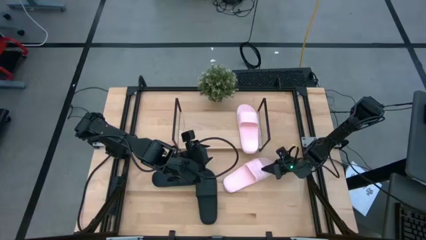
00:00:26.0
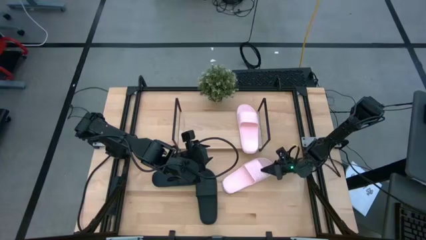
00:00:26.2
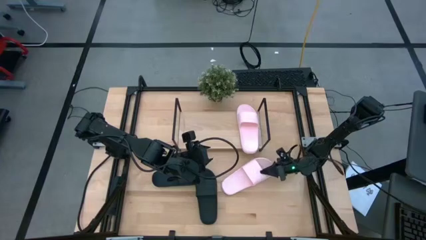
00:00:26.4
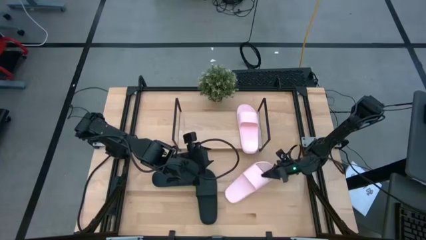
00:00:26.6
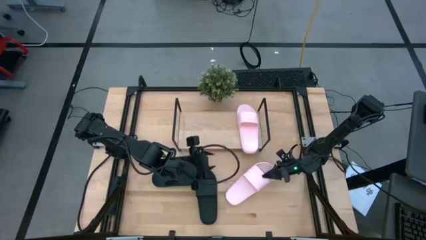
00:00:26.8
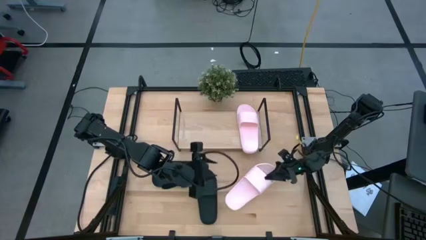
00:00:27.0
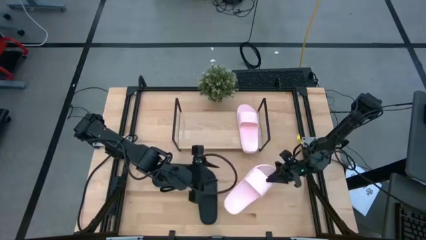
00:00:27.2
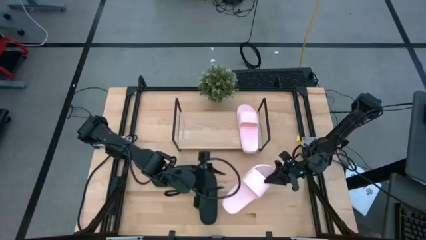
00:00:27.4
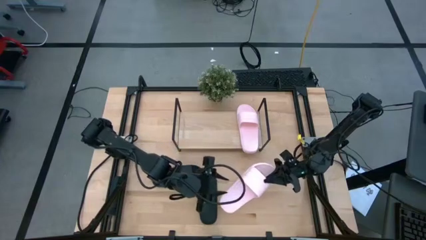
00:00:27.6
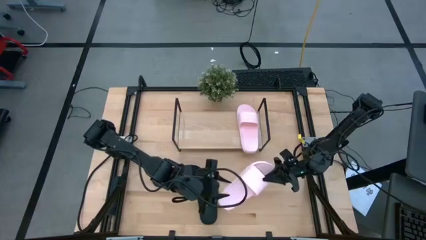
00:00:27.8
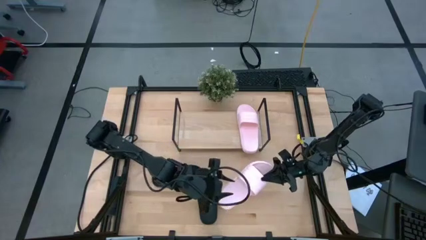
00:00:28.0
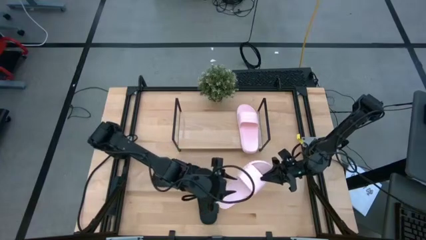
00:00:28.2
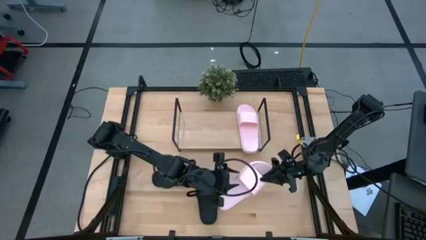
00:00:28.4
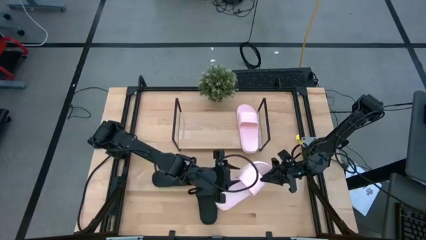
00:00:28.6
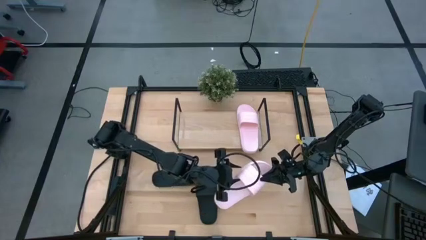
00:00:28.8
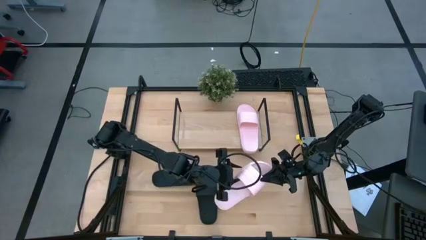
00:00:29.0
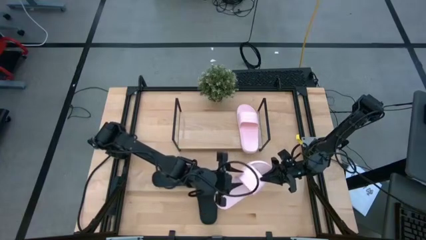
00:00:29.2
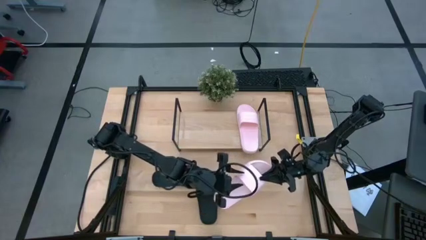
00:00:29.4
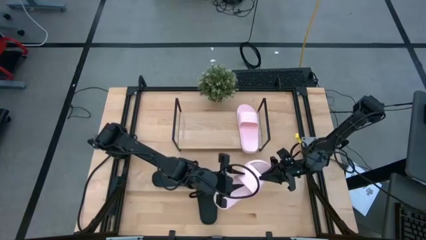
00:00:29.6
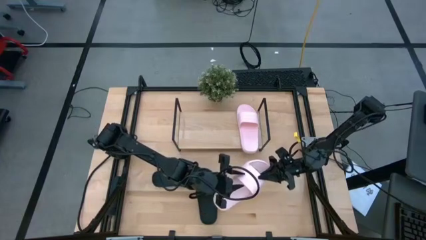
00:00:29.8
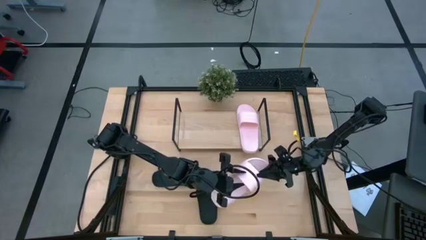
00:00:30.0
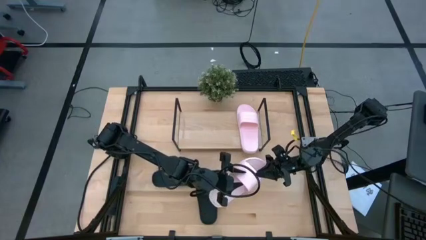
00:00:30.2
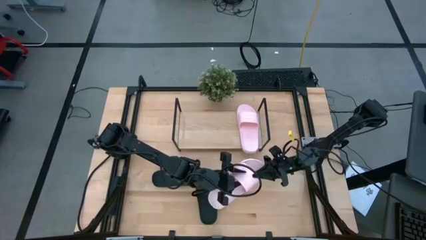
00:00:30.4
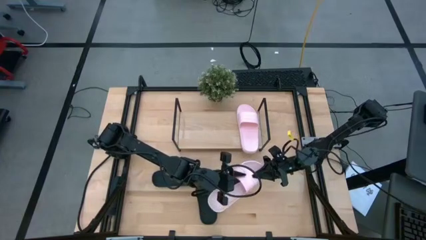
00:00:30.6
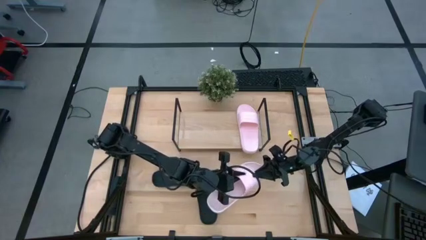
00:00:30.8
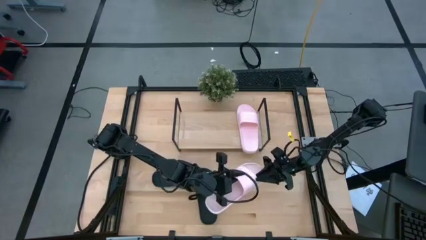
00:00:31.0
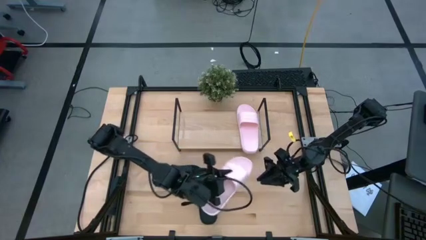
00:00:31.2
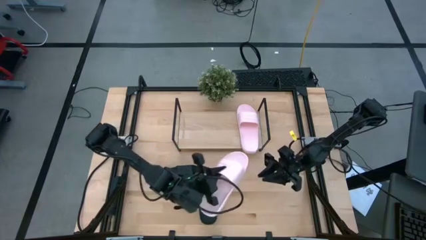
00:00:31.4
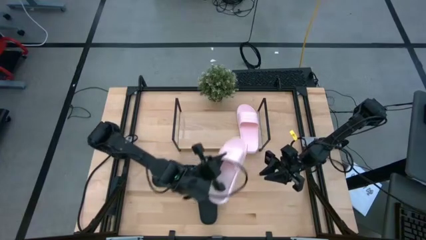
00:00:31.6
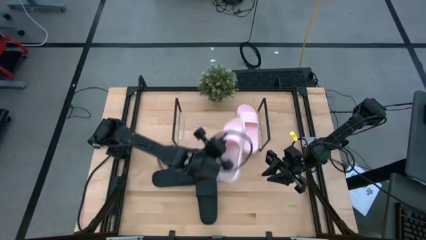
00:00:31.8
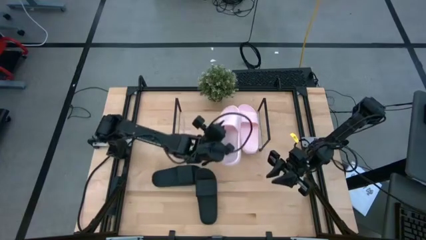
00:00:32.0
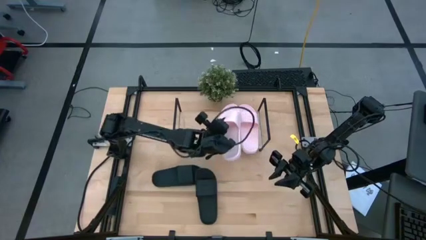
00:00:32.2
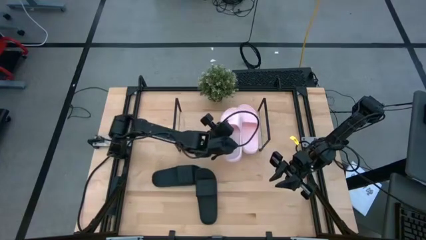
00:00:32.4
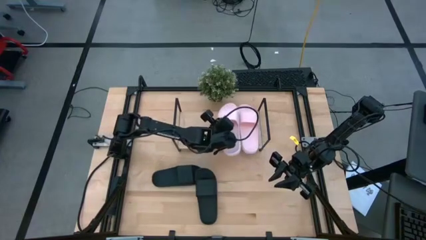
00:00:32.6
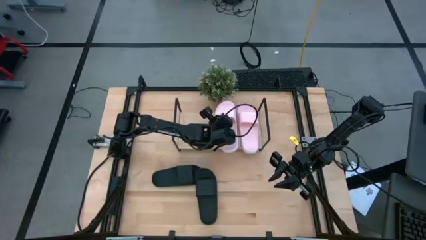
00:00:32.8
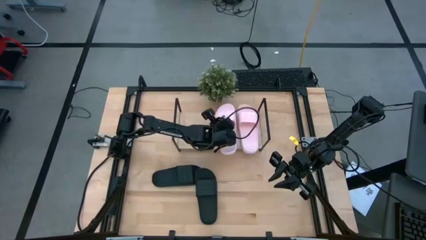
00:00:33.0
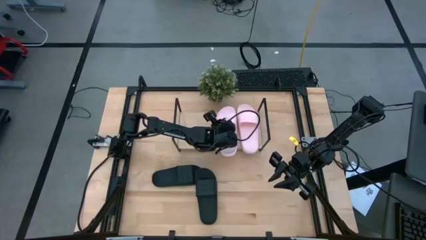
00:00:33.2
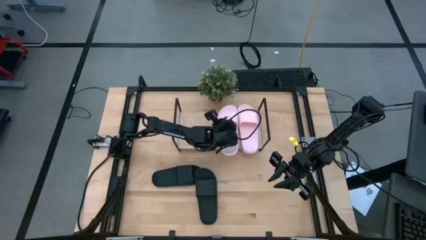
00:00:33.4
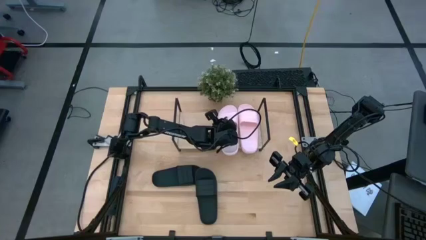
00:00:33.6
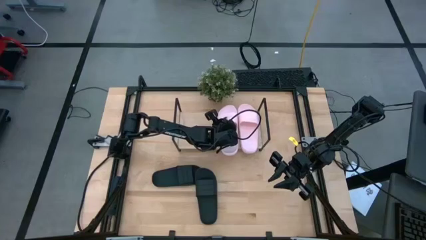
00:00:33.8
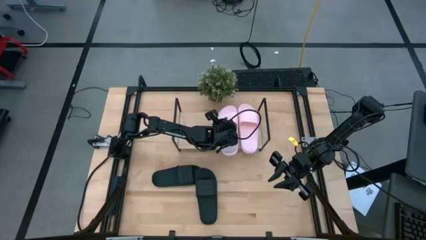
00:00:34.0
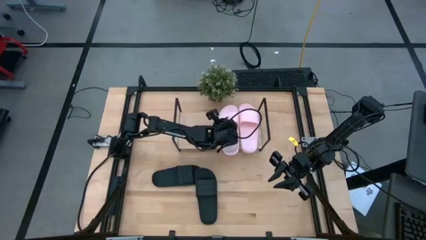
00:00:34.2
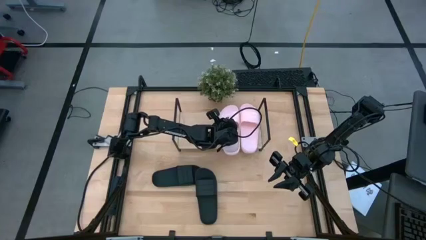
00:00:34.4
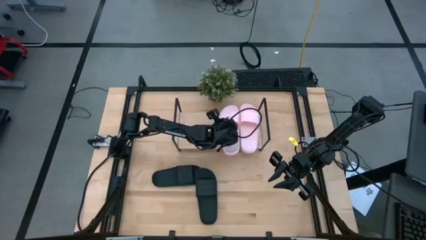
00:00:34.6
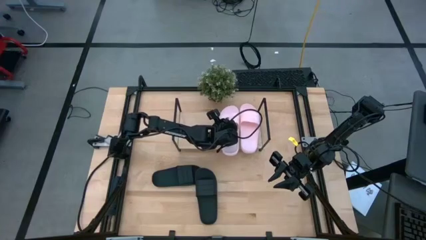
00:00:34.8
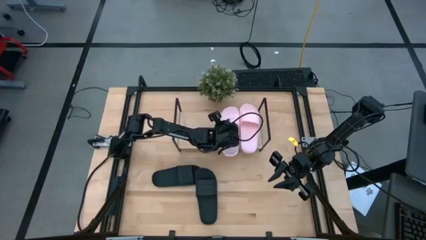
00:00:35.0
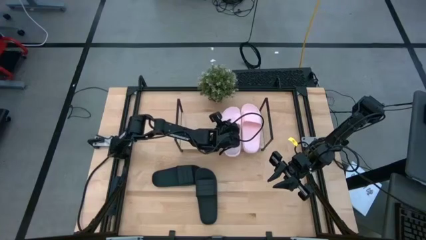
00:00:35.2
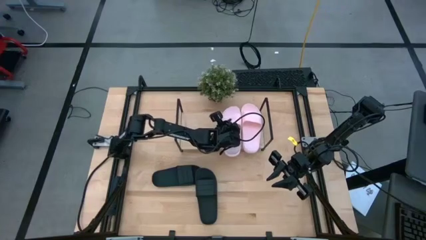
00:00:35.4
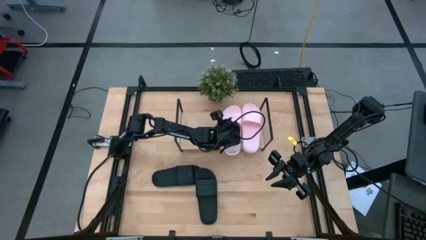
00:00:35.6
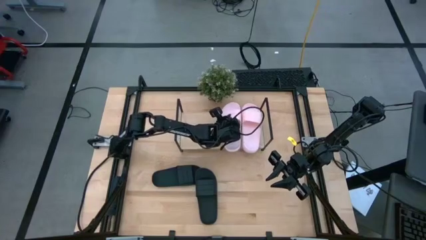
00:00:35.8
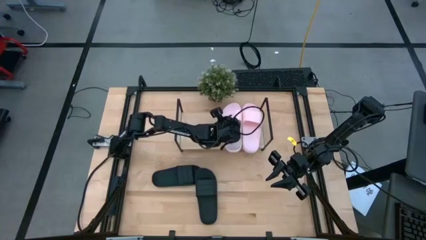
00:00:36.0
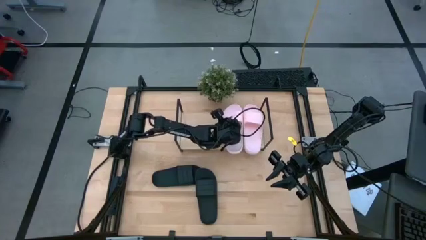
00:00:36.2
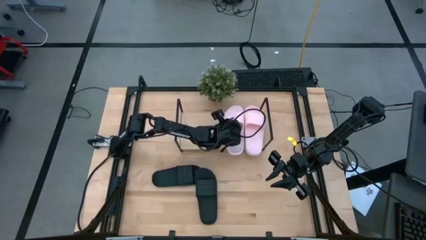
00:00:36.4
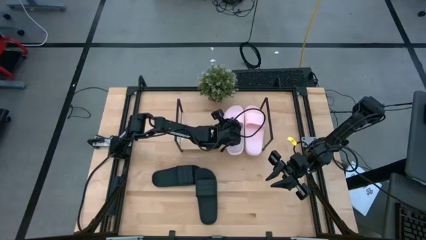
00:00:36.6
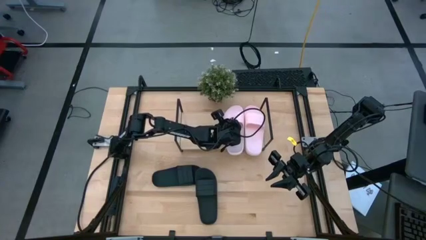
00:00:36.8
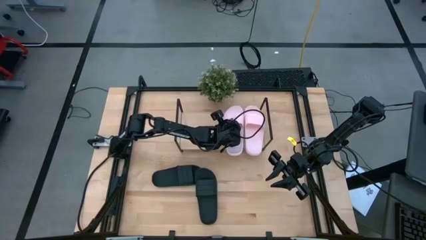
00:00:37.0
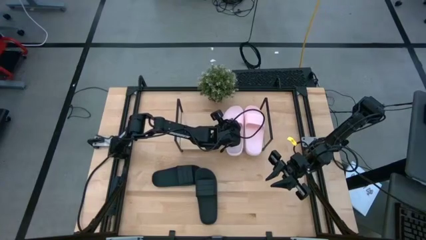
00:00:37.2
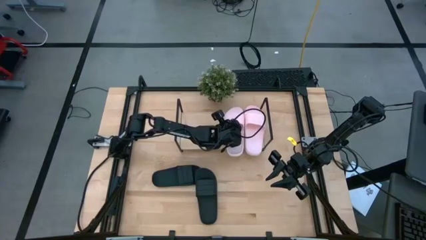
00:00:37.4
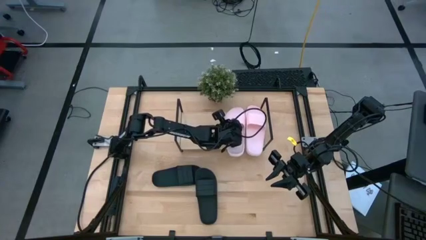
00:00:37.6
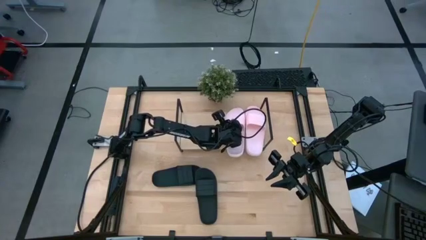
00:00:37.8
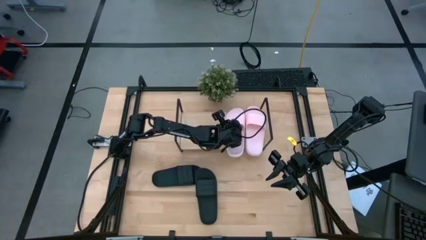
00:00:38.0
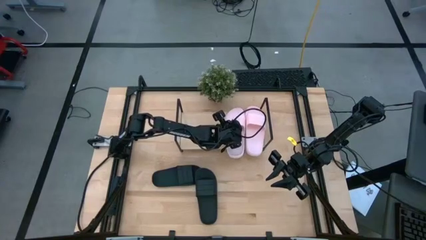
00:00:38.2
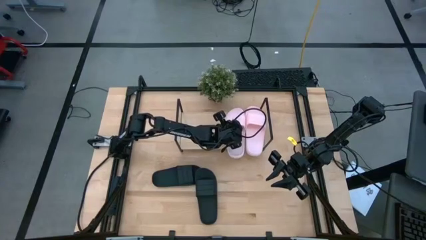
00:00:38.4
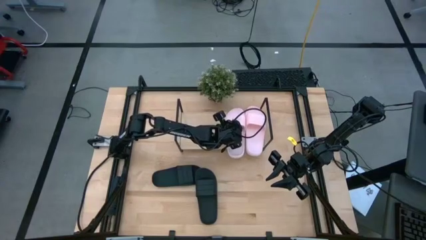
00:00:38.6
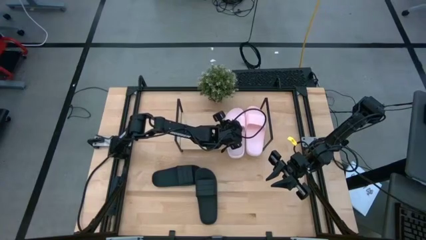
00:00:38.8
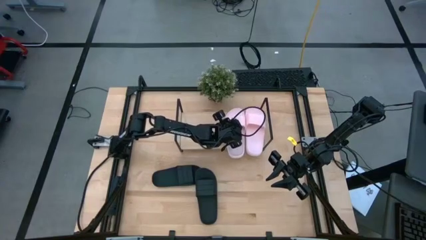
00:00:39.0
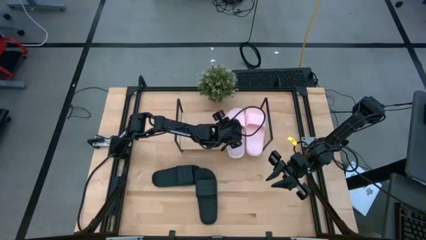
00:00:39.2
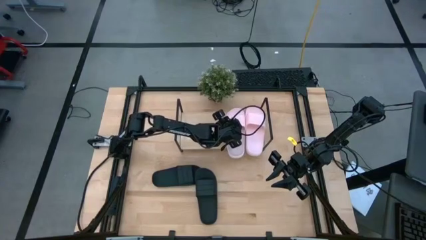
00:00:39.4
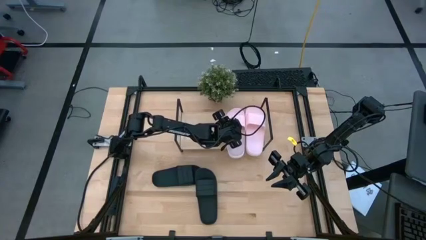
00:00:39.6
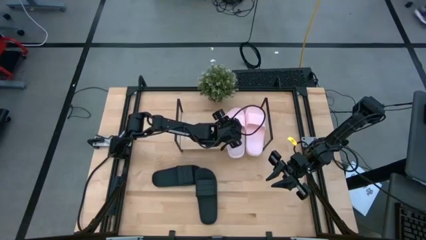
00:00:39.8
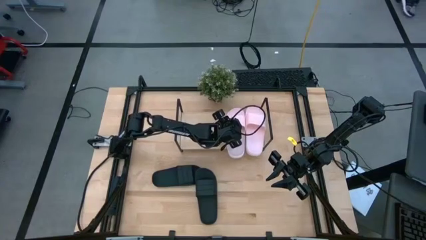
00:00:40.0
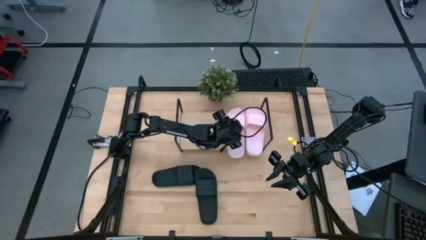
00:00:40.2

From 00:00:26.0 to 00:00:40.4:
Task: Pick and place slides into the shelf
Put the pink slides on the shelf

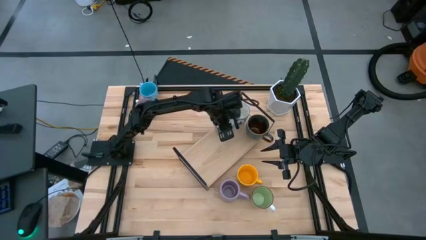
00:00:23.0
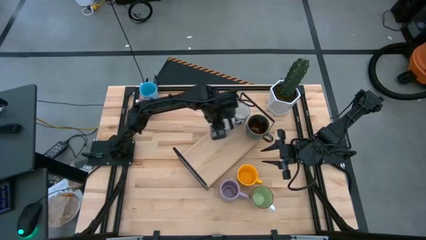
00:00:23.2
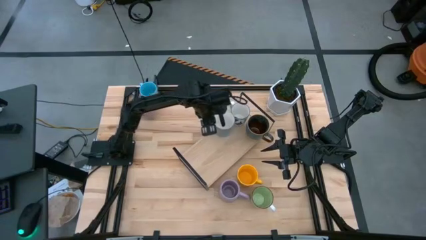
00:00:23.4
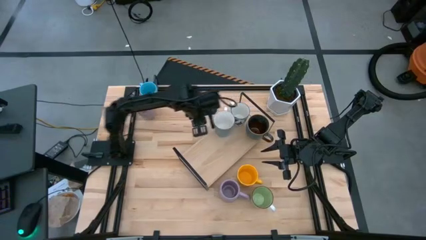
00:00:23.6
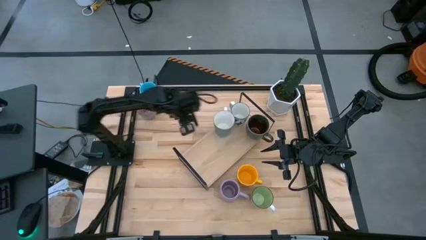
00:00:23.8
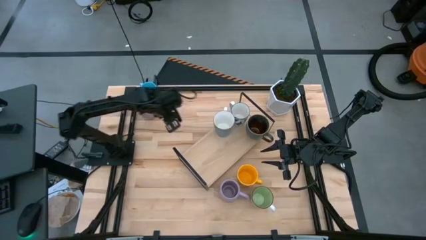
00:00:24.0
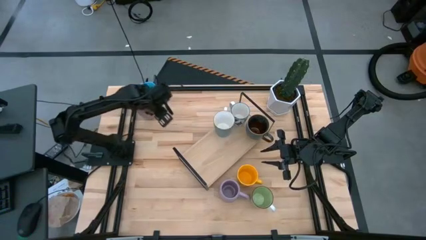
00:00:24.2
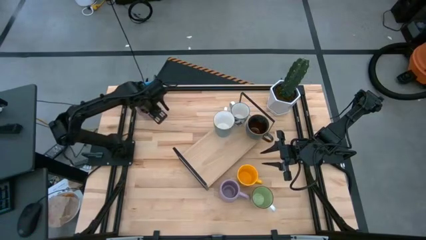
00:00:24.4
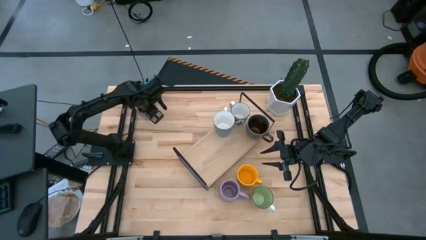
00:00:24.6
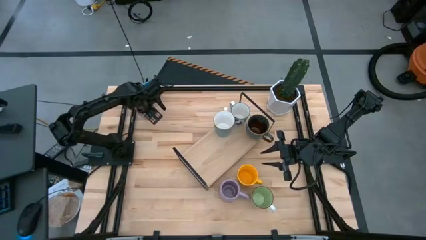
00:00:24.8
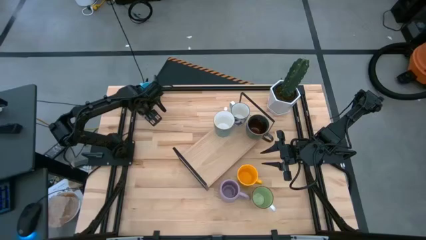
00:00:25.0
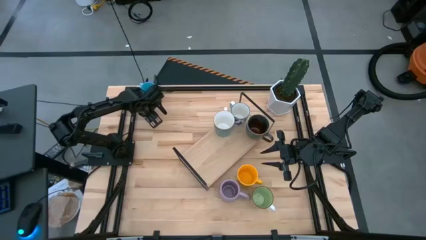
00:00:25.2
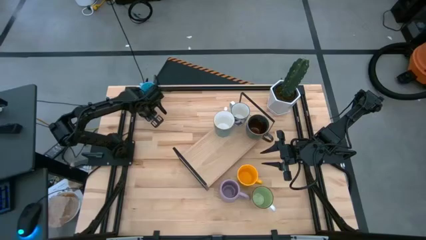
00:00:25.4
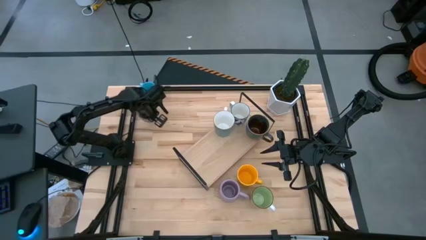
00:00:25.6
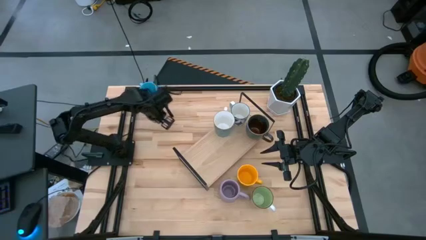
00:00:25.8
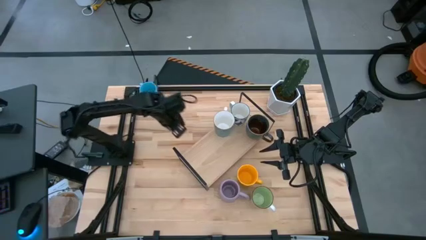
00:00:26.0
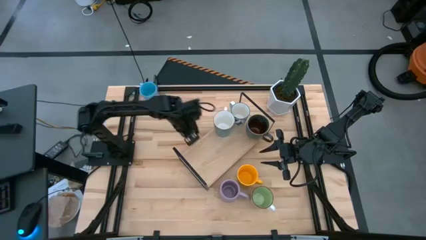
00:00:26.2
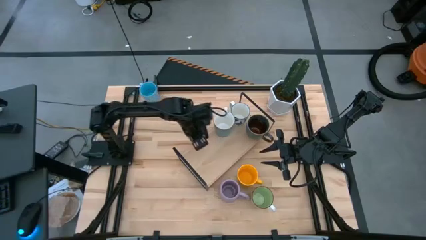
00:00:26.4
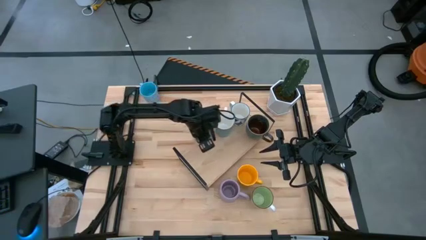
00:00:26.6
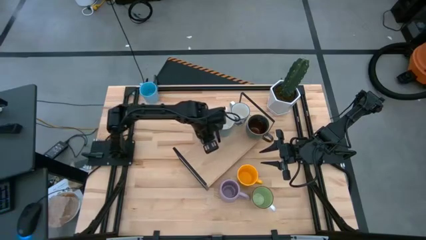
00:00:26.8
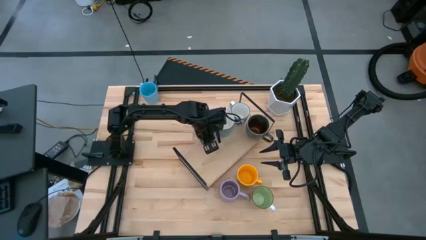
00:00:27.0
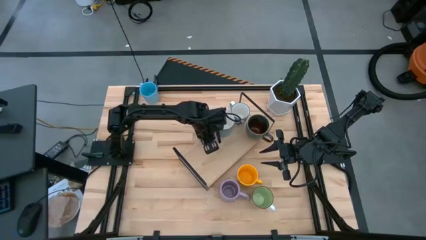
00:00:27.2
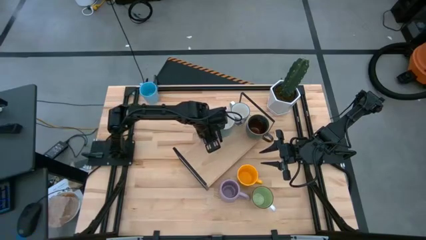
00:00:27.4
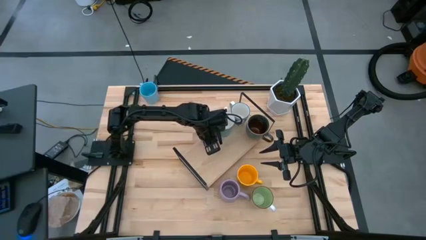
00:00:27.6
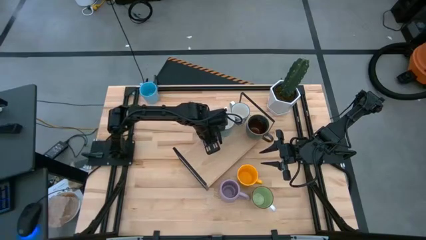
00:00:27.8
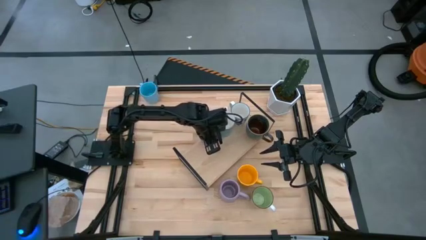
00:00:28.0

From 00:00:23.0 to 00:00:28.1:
Task: Place coffee mugs
Put the top violet mug on the shelf
